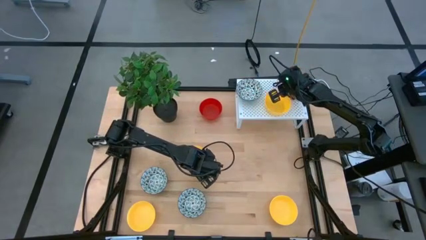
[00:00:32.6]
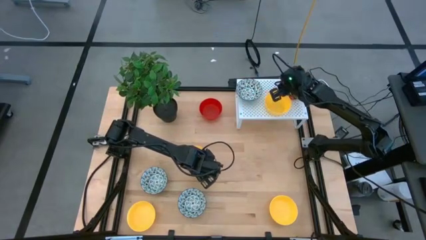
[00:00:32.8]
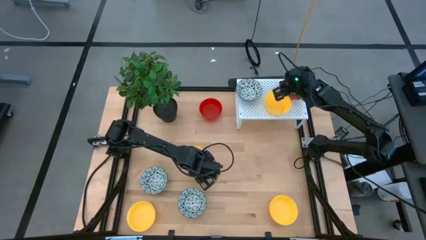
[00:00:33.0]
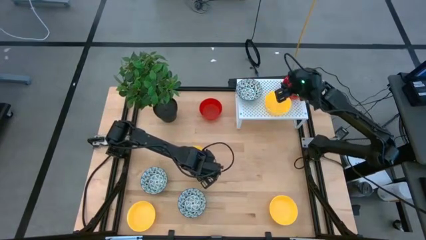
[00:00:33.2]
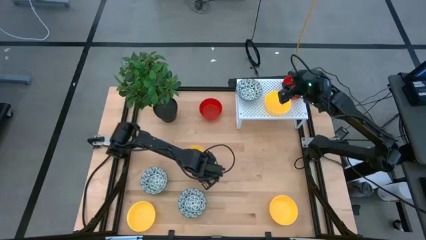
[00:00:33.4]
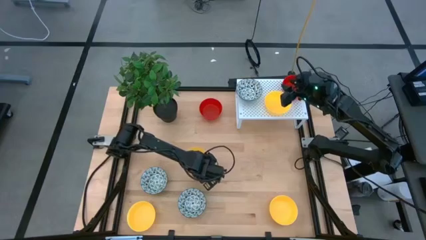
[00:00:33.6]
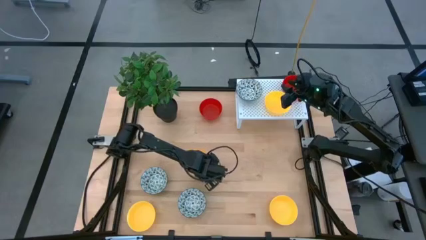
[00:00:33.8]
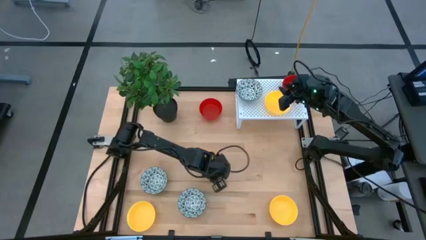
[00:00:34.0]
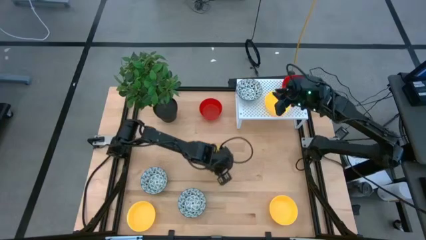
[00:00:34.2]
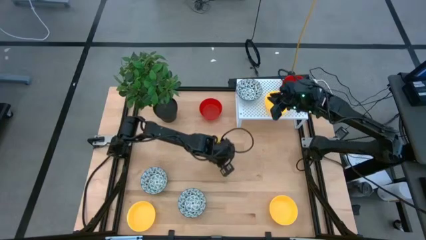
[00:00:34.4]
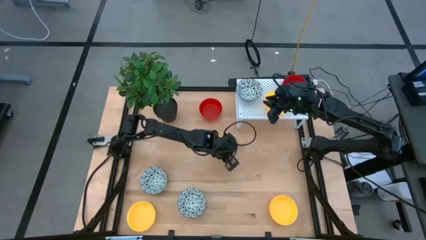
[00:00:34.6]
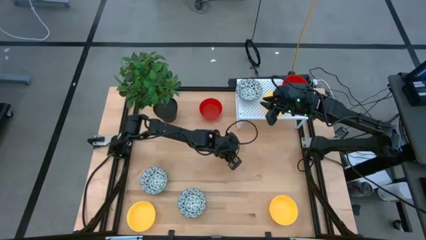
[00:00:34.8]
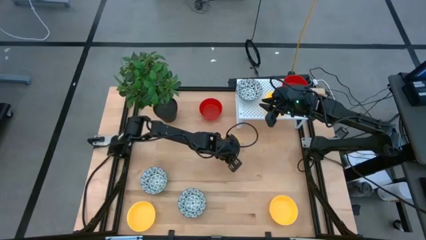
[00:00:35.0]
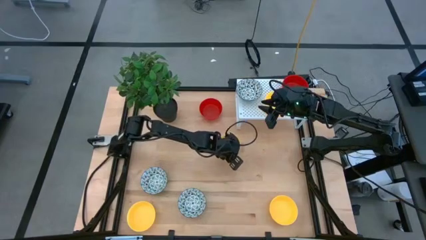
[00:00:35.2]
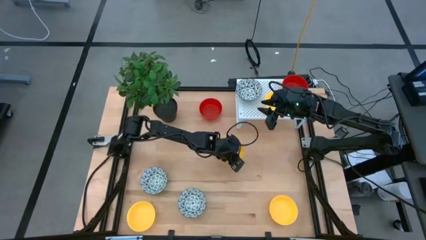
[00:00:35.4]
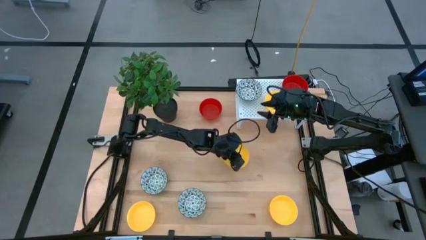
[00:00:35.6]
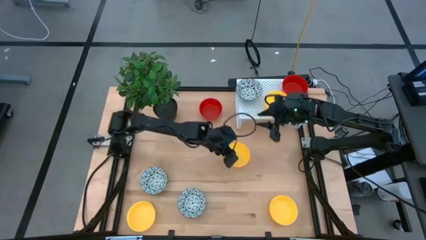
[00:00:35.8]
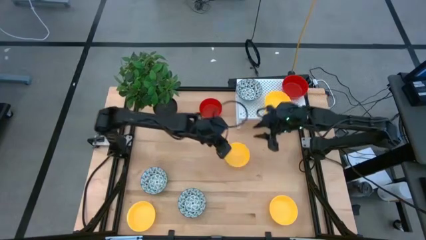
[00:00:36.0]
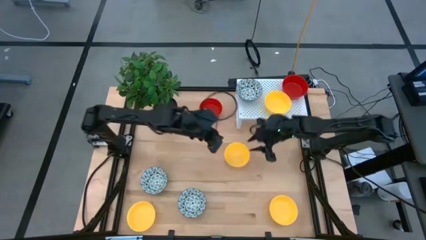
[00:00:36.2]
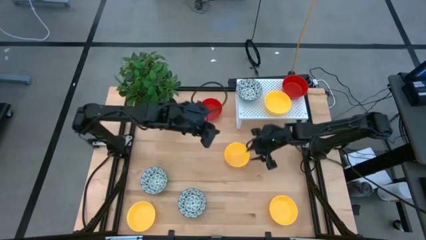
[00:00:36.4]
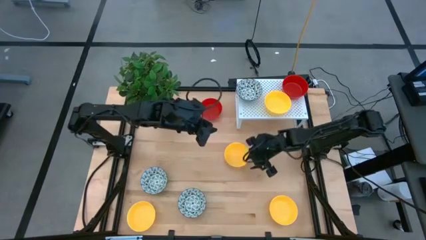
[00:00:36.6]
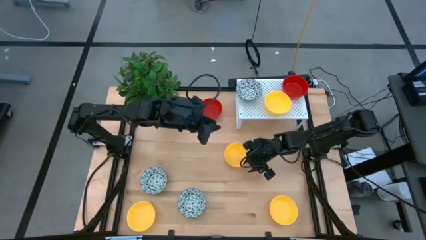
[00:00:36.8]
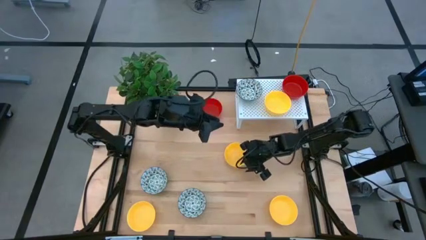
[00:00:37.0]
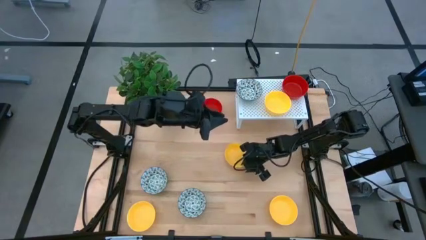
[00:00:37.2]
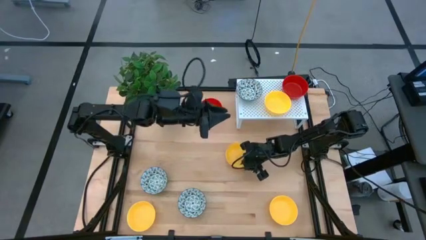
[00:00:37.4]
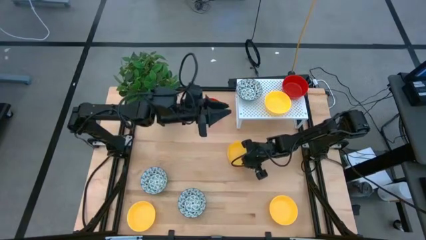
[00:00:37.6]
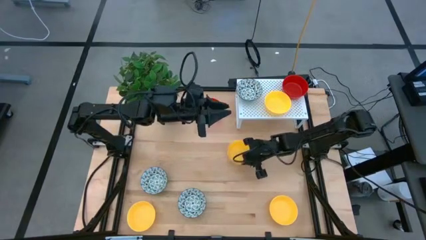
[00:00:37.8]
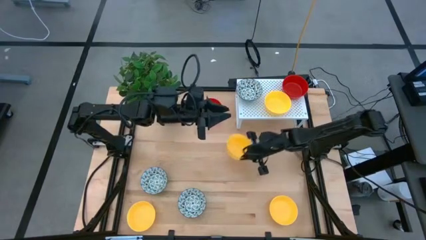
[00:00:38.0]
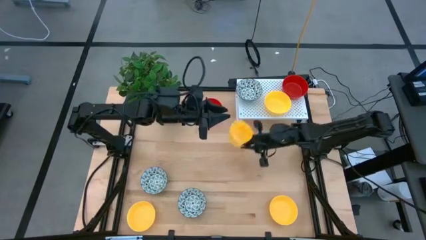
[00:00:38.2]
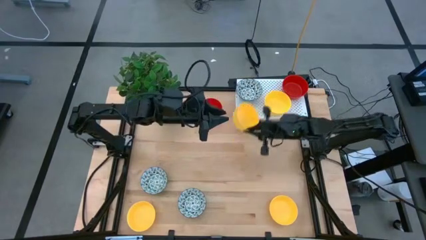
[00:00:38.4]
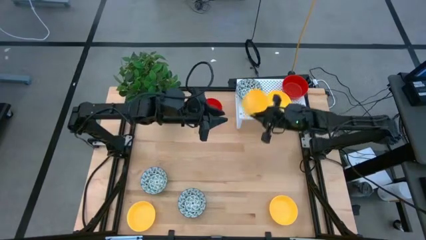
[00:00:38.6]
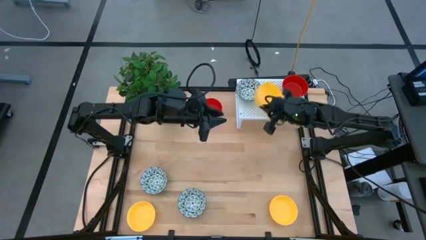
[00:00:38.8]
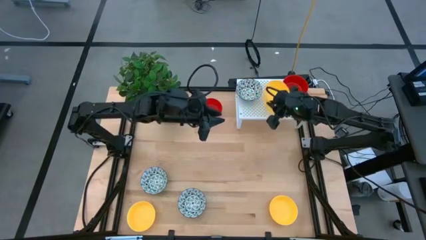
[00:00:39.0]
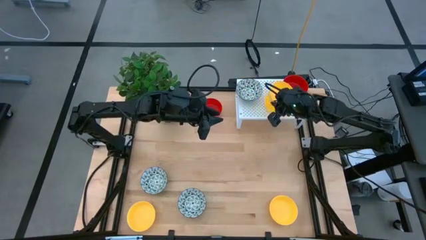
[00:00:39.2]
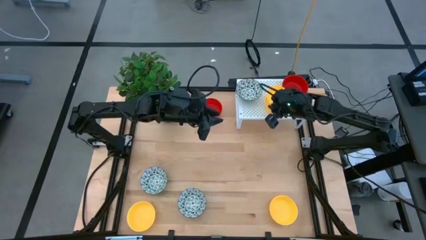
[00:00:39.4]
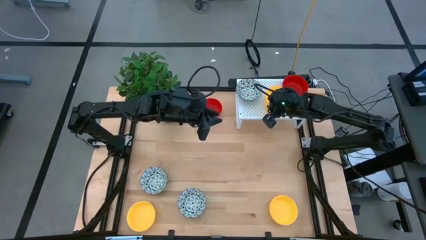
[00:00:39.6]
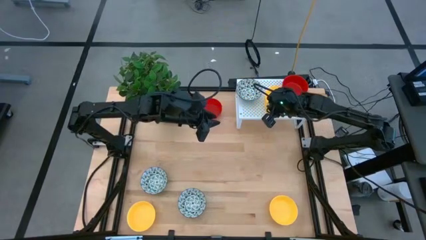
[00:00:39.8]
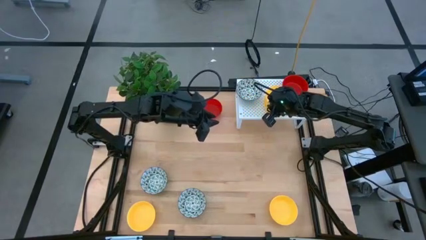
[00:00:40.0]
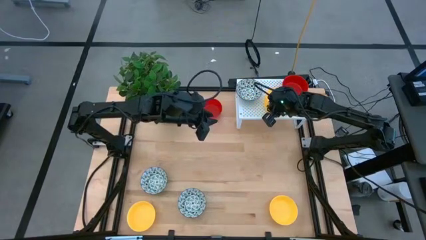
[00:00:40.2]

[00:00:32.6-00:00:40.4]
Task: Pick & Place Mini bowls
Stack the yellow bowl on the yellow bowl on the shelf

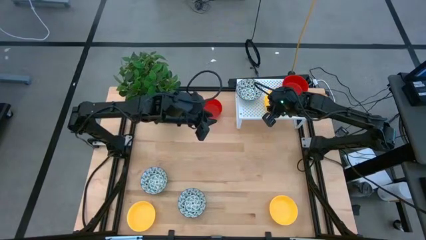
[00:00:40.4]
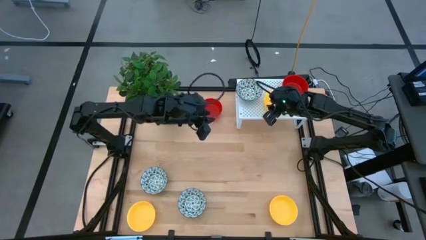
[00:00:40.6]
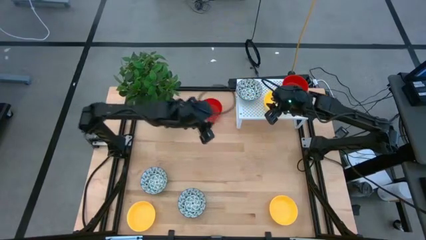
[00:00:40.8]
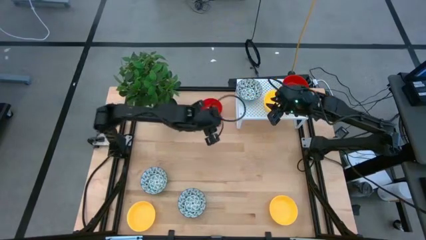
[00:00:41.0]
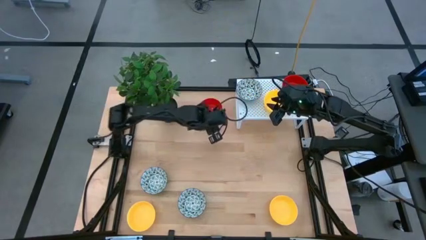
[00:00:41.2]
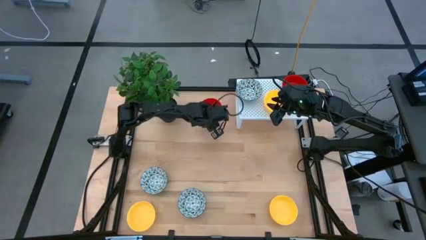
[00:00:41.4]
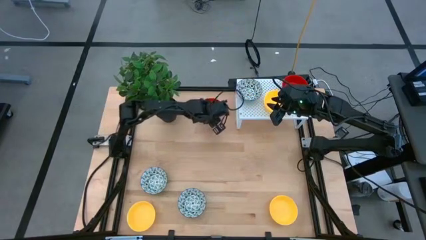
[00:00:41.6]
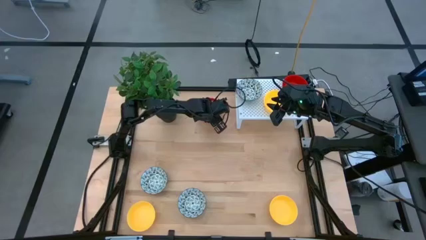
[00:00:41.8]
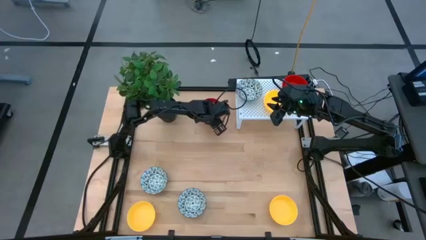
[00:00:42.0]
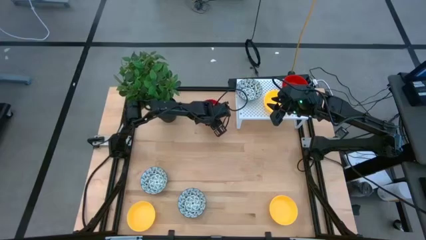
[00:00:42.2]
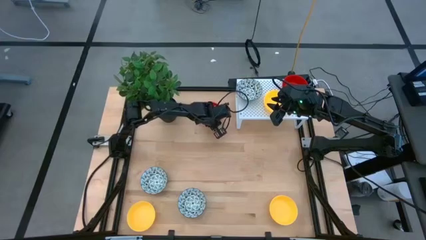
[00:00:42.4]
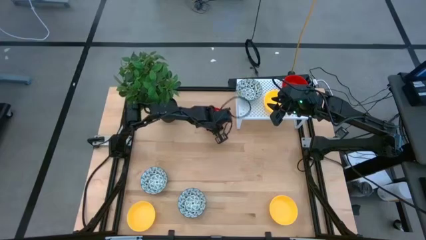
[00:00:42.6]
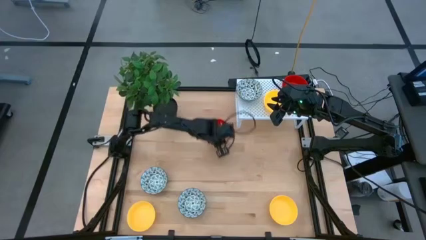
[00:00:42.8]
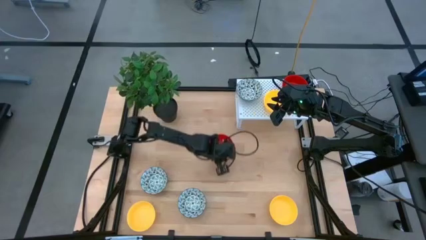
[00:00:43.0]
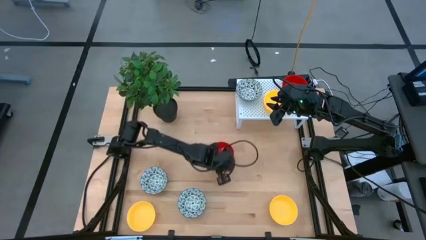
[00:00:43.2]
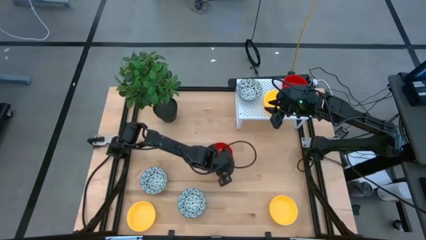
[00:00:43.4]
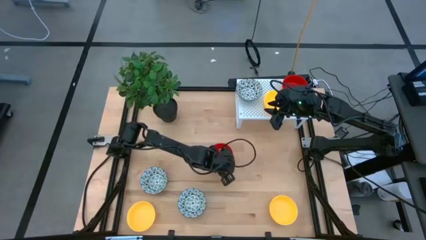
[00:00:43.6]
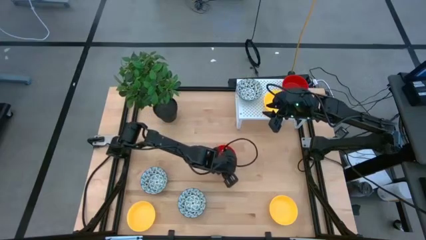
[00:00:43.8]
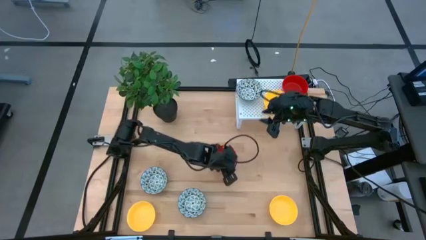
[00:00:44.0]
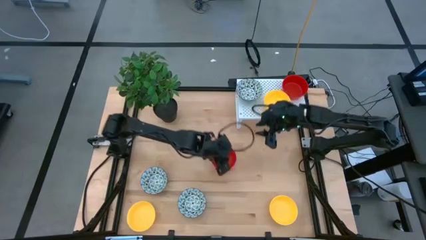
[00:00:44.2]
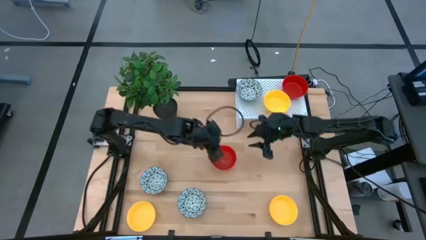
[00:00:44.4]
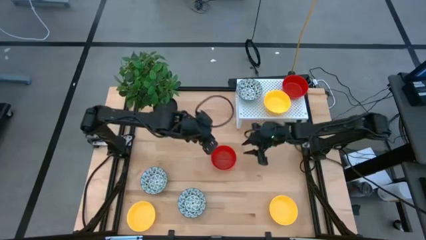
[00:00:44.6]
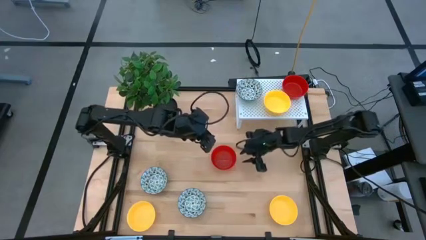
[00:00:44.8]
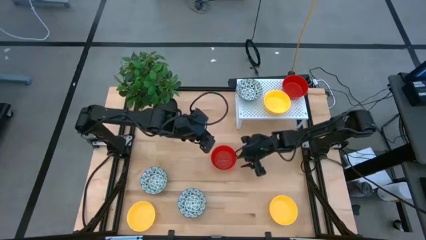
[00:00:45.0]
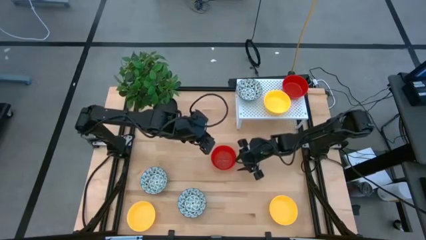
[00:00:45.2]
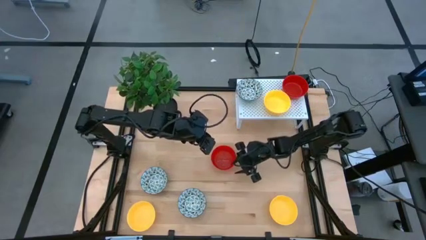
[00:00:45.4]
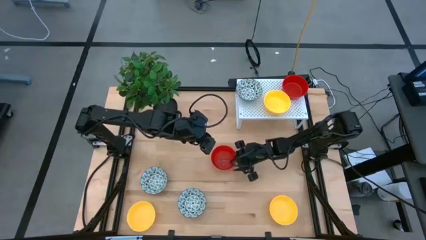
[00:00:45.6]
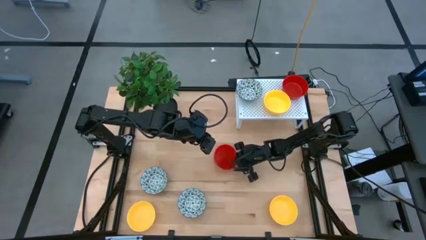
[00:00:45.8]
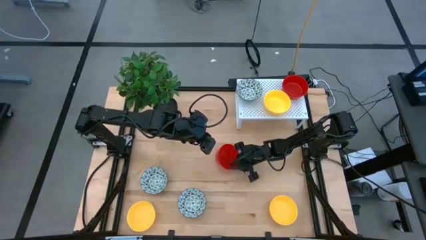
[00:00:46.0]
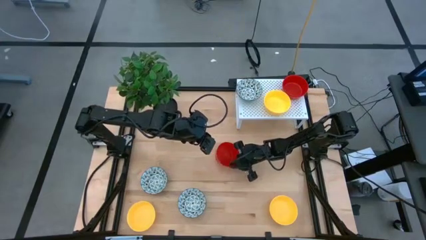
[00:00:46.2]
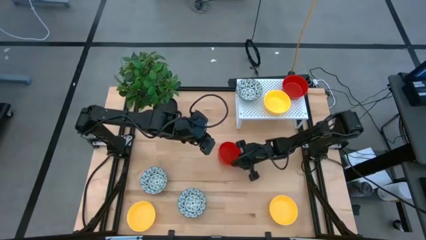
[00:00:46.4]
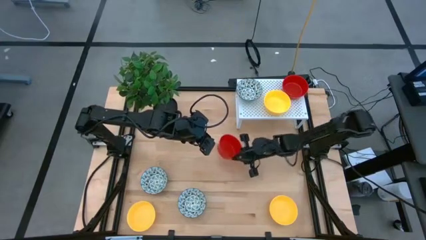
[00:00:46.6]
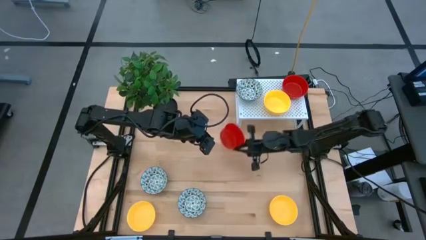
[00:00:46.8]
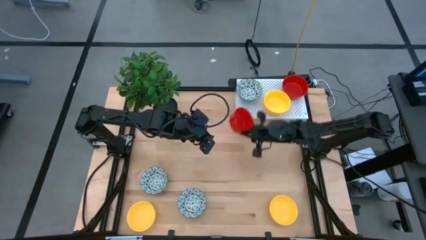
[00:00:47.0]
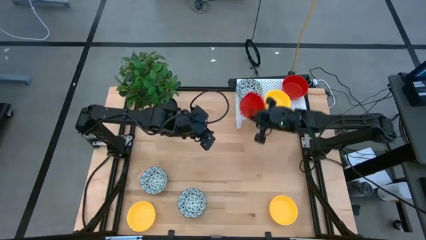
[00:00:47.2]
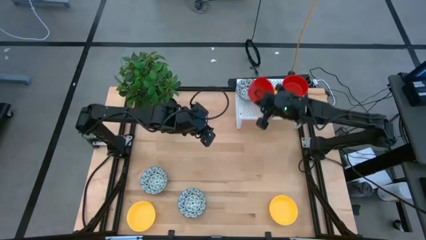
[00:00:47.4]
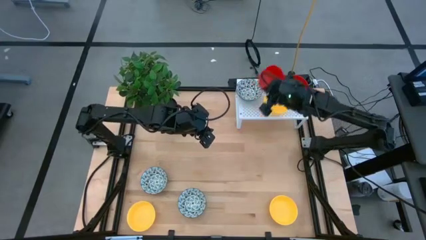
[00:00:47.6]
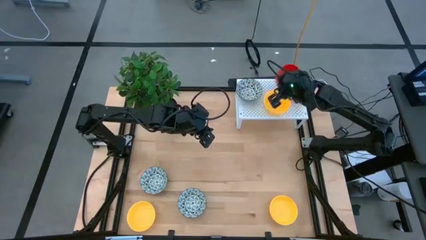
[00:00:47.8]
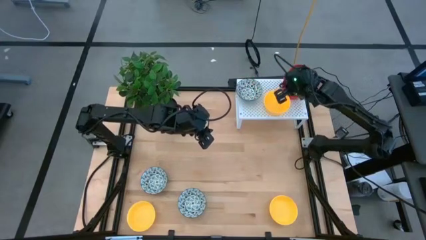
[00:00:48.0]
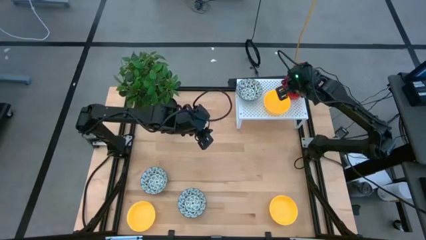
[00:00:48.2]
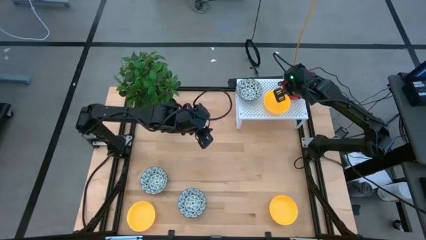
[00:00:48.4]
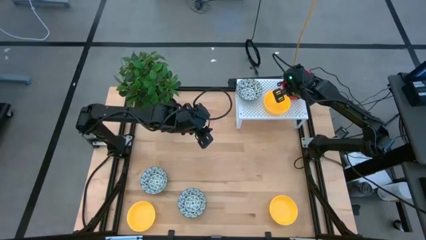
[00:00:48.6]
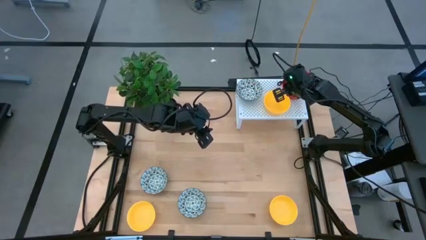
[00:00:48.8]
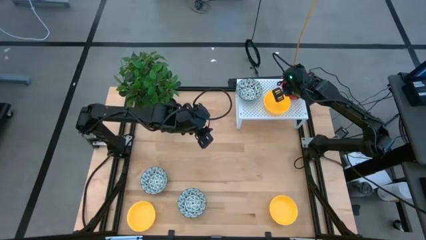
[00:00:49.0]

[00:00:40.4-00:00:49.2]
Stack the red bowl on the red bowl on the shelf
